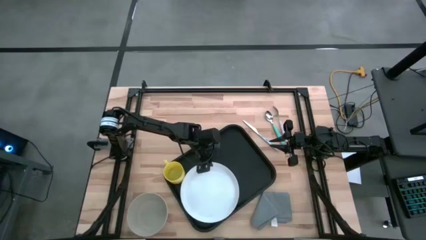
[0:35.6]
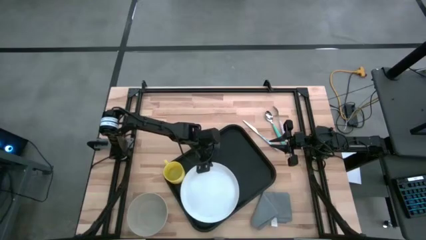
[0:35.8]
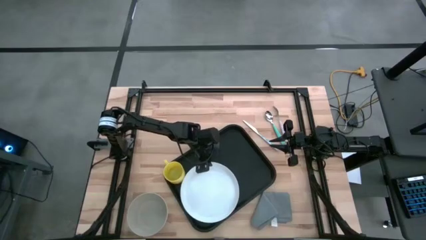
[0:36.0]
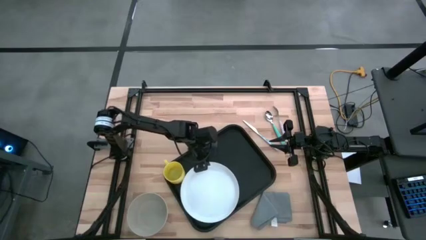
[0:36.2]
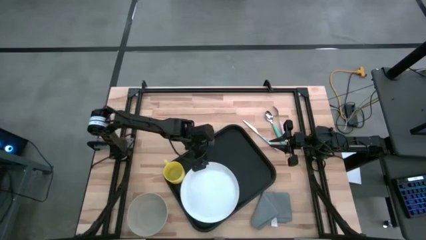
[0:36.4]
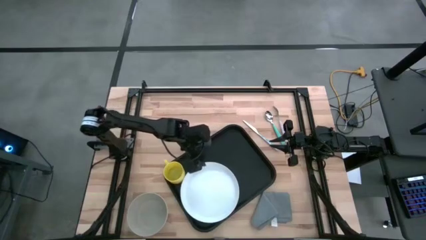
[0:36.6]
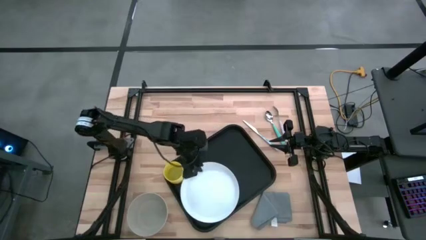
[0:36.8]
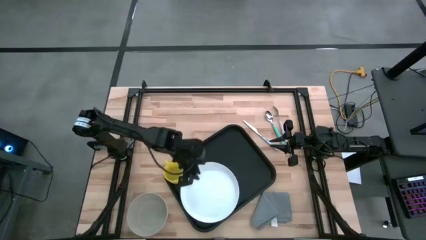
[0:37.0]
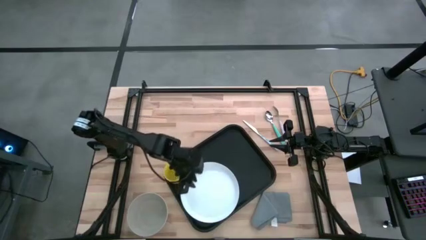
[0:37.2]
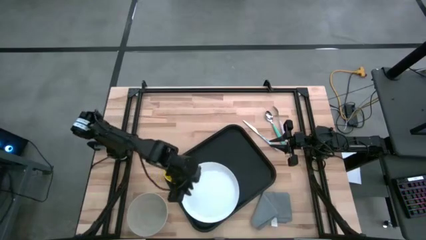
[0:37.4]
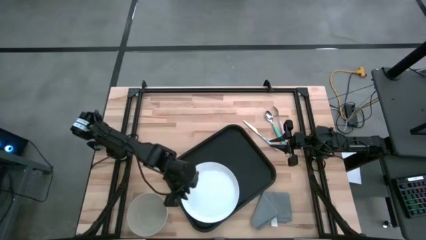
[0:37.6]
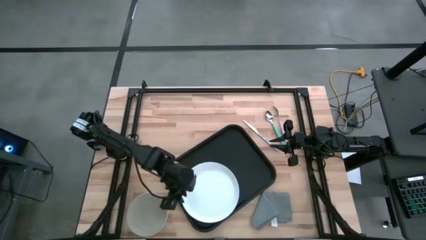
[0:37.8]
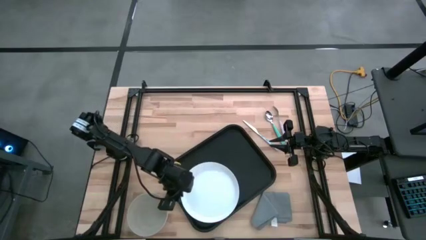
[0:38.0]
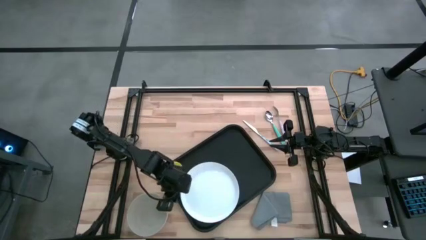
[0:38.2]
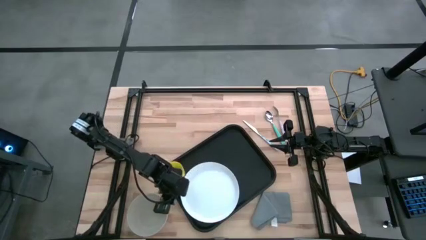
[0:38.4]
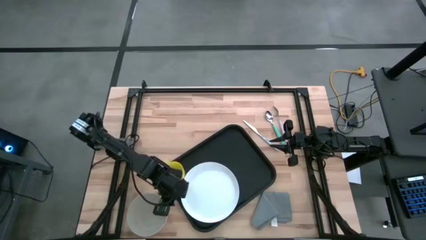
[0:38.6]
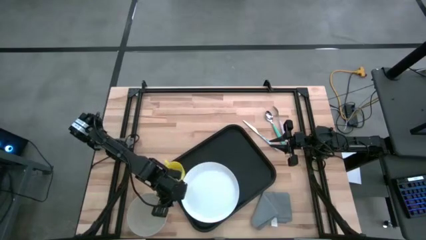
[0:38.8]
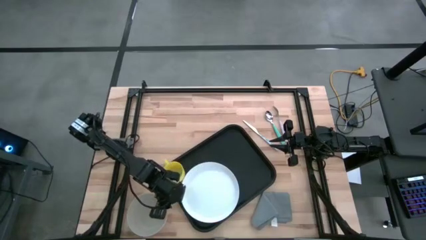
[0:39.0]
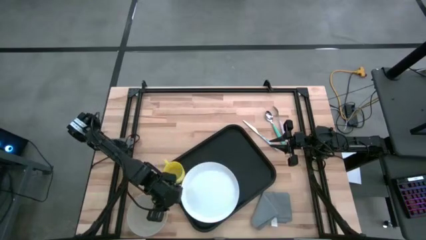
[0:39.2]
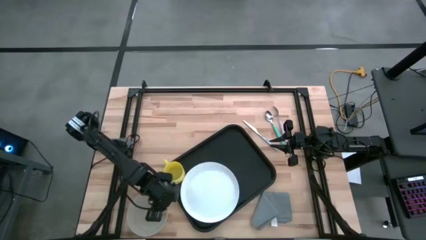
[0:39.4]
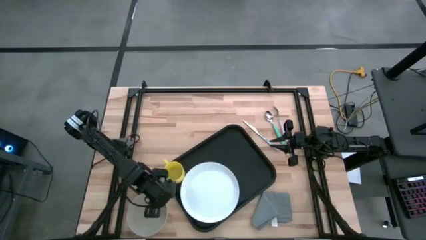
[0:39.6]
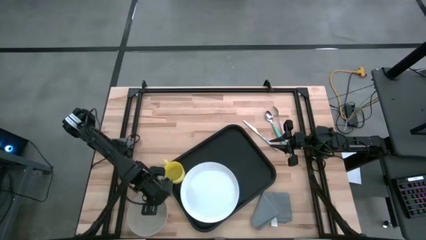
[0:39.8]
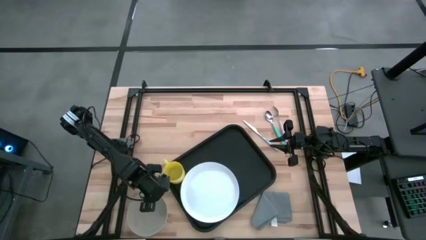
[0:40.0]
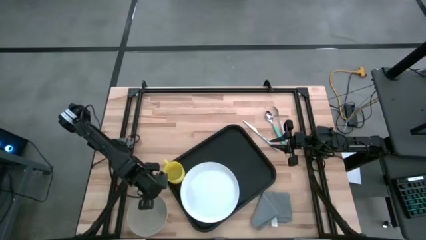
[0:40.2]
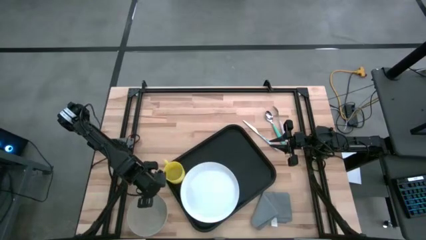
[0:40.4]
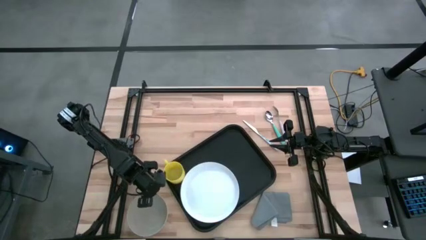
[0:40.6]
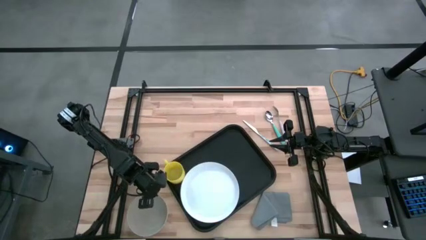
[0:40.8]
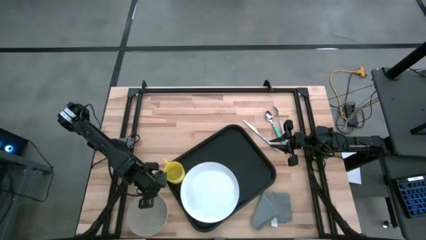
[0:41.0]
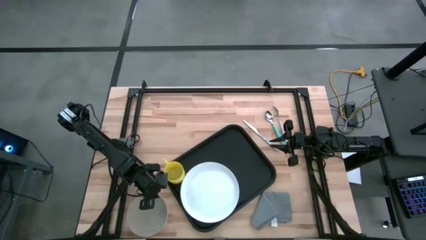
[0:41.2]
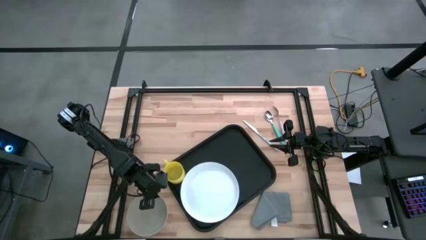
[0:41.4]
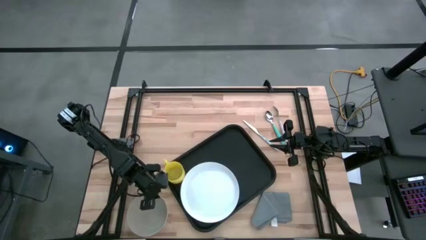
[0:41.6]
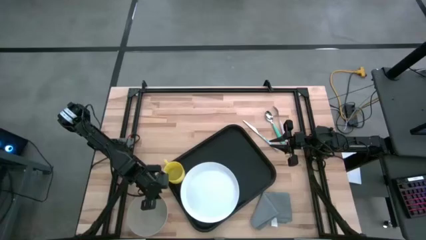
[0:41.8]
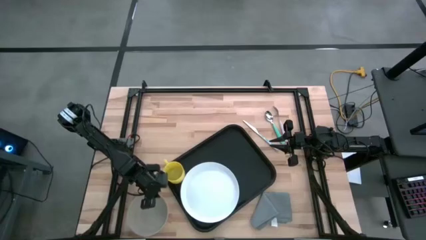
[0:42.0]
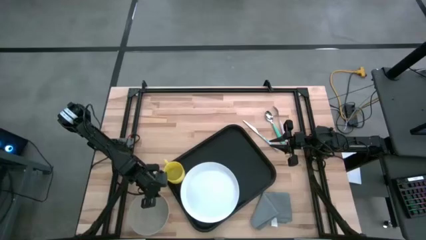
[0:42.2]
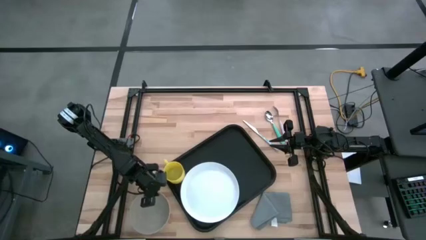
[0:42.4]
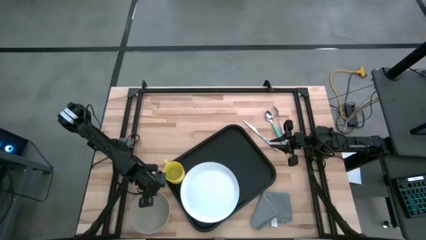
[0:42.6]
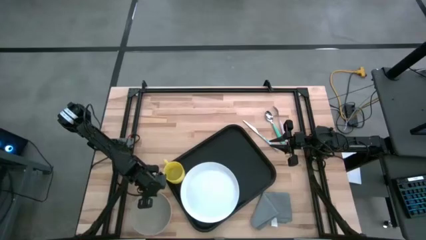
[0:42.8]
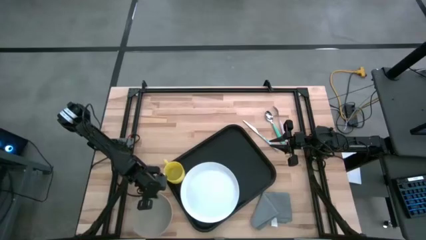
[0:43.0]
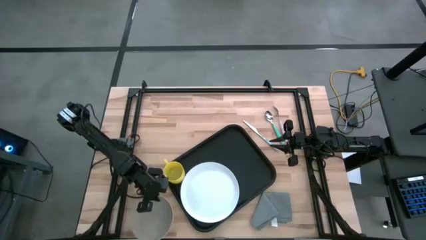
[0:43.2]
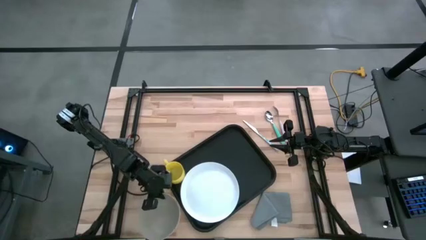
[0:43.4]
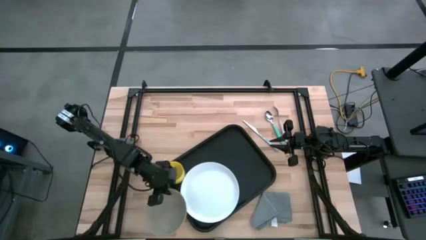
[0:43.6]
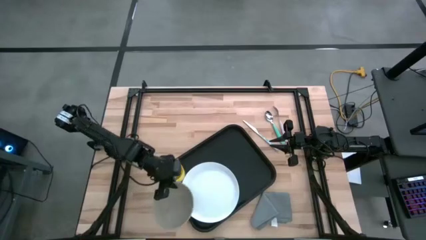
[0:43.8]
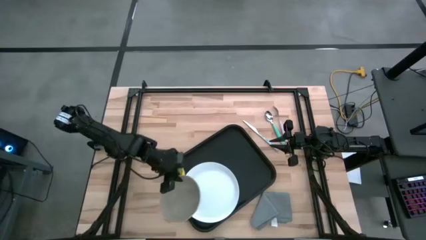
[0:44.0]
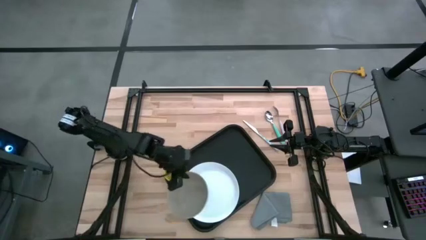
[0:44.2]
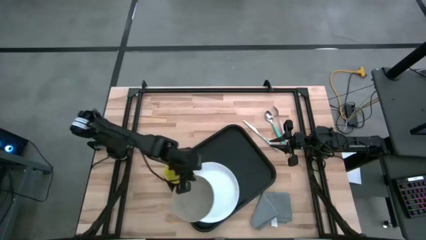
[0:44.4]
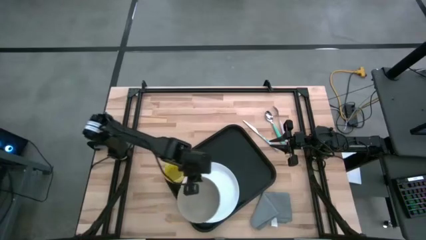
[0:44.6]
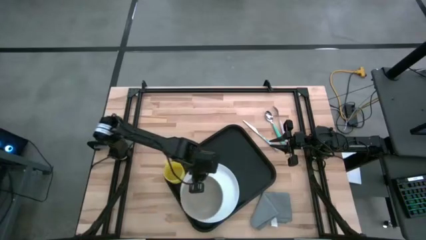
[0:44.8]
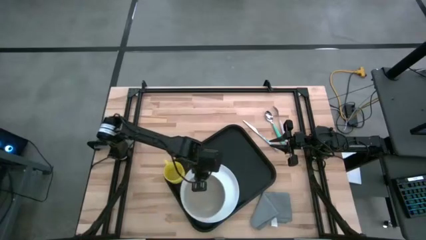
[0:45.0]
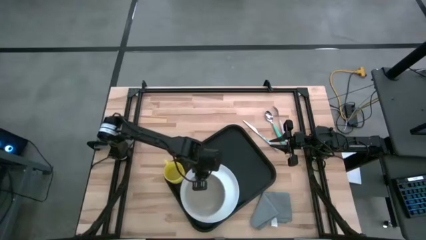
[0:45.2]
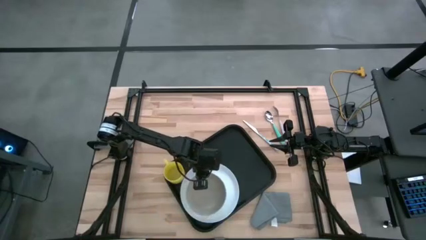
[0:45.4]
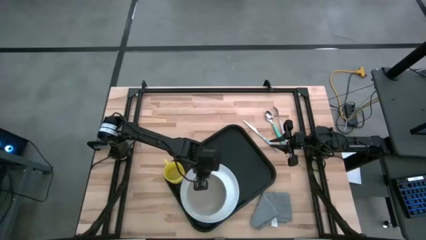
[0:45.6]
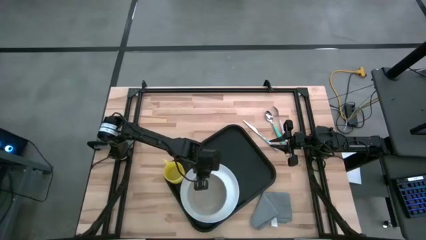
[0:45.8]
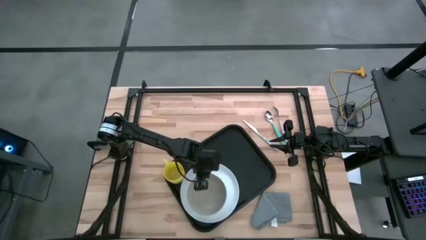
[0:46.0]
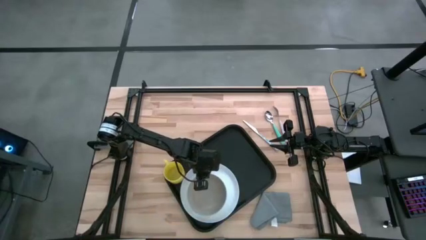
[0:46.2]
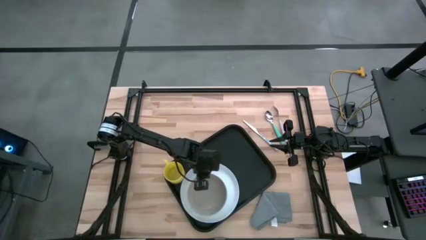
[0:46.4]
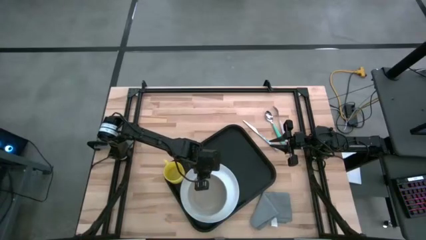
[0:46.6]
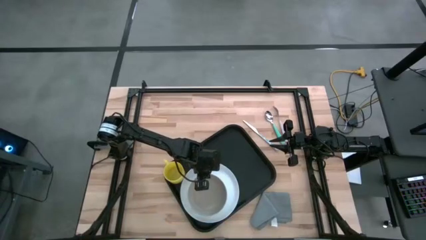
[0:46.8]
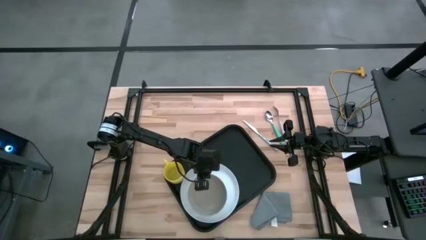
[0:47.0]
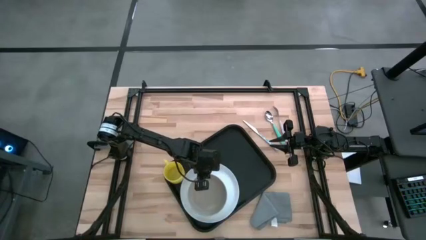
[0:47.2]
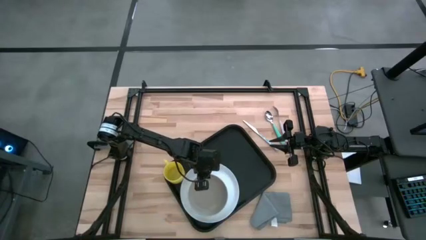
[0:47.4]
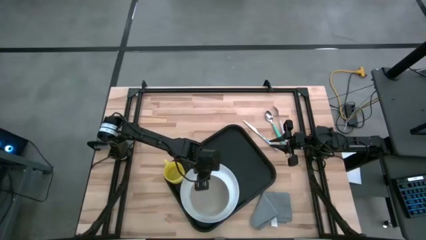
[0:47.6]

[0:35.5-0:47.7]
Task: Set up tray
Put the gray bowl on the white plate
